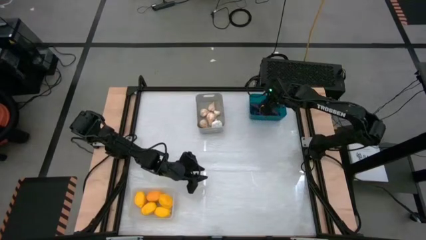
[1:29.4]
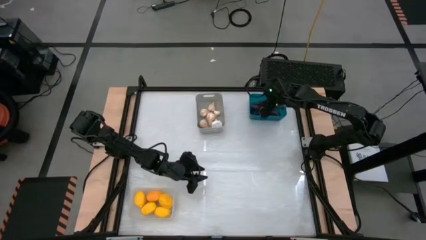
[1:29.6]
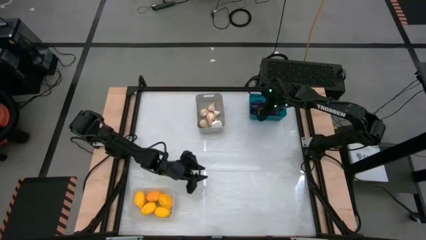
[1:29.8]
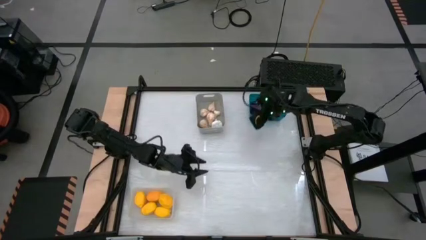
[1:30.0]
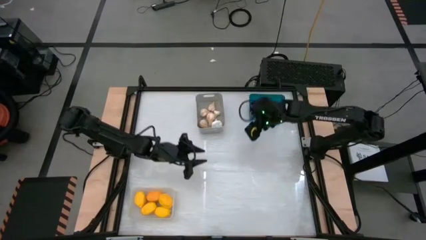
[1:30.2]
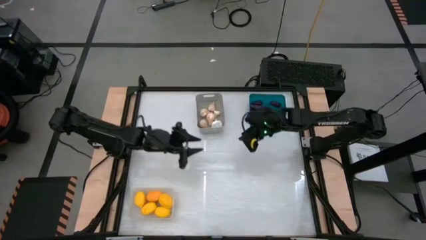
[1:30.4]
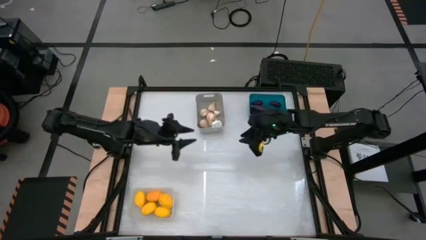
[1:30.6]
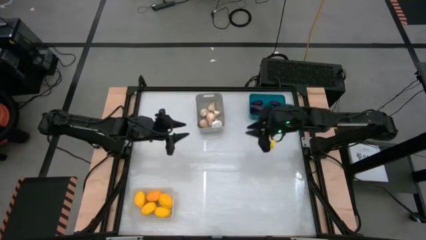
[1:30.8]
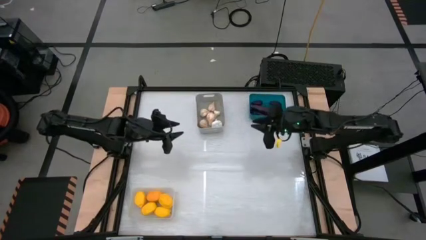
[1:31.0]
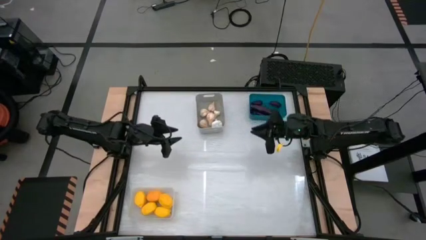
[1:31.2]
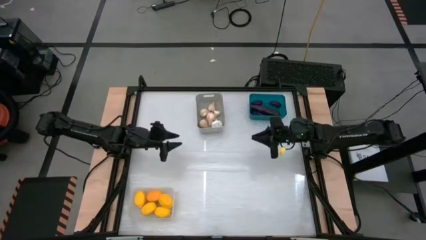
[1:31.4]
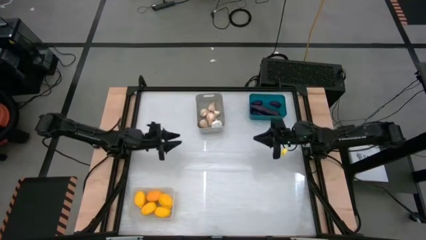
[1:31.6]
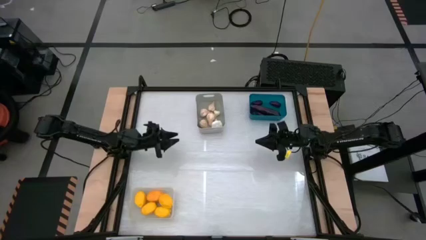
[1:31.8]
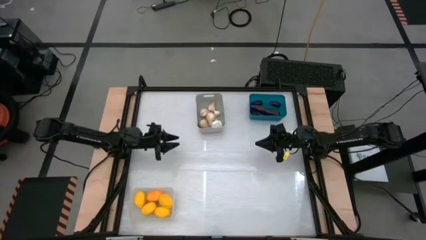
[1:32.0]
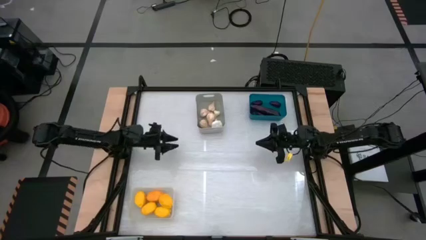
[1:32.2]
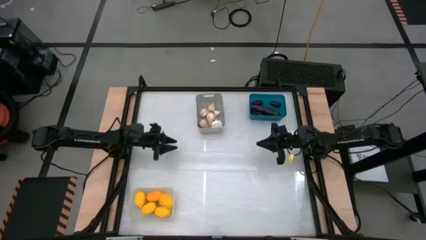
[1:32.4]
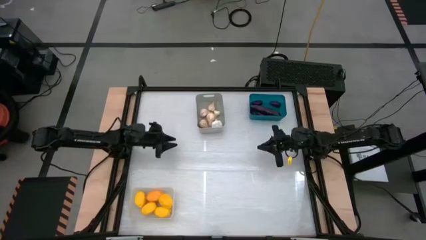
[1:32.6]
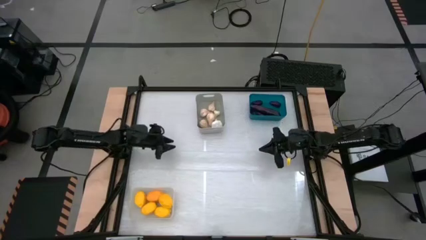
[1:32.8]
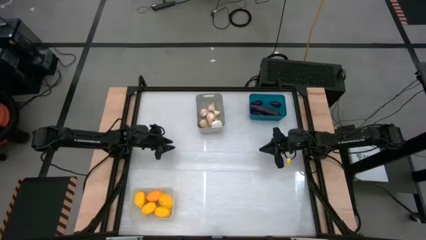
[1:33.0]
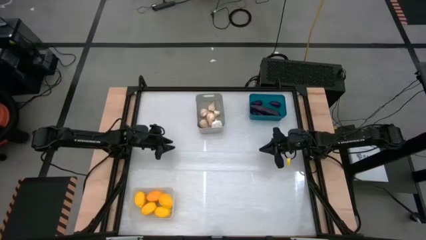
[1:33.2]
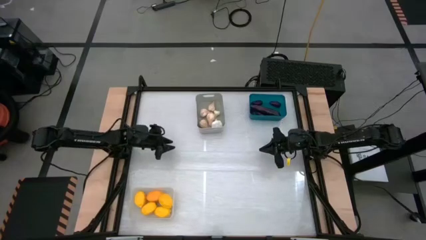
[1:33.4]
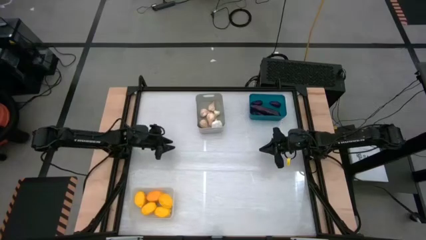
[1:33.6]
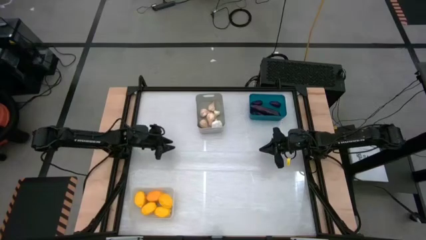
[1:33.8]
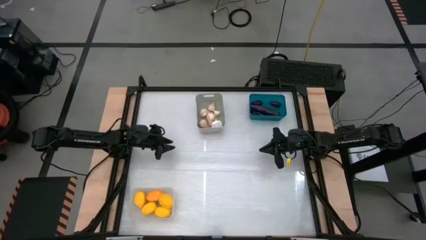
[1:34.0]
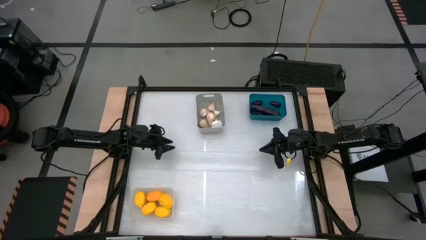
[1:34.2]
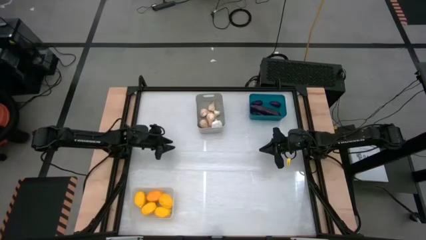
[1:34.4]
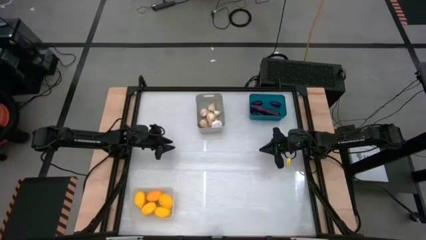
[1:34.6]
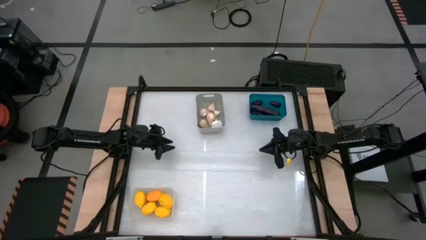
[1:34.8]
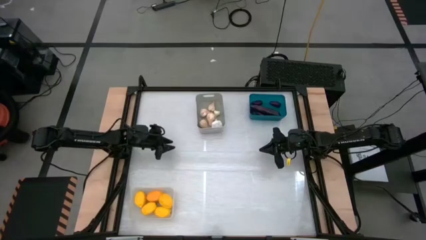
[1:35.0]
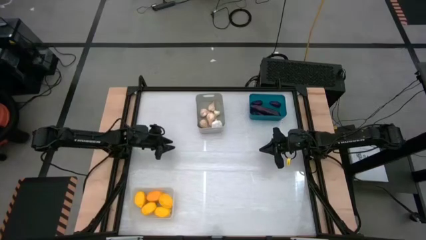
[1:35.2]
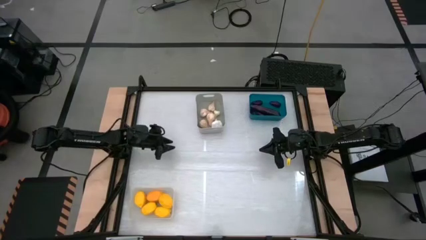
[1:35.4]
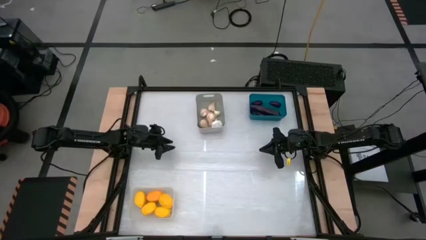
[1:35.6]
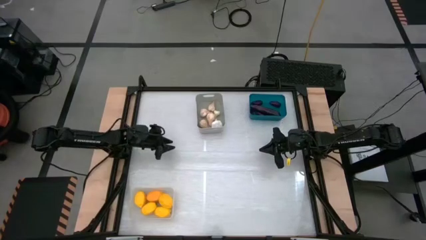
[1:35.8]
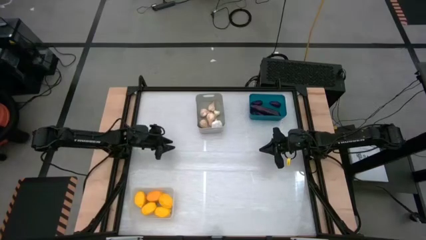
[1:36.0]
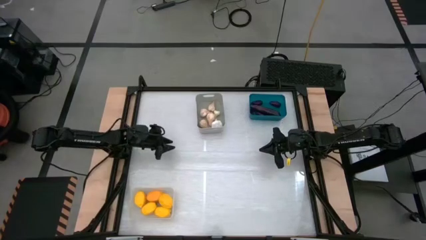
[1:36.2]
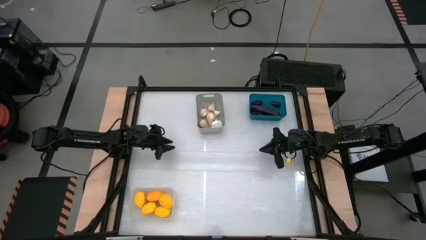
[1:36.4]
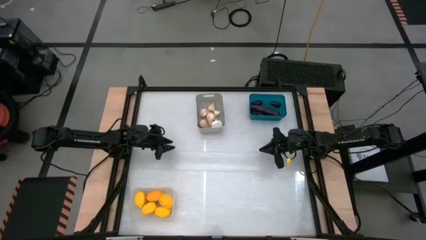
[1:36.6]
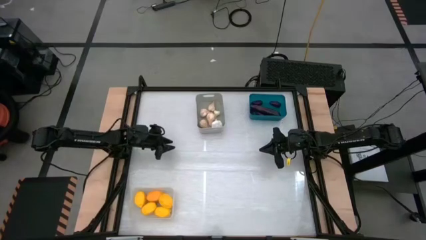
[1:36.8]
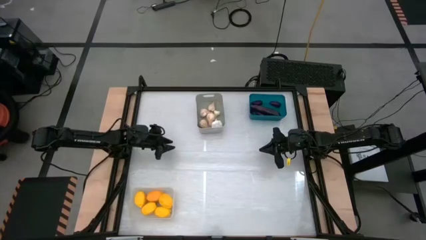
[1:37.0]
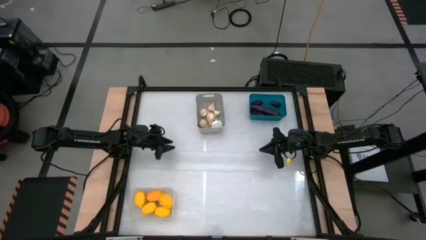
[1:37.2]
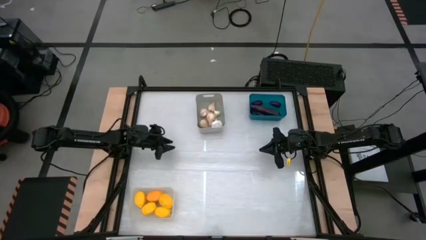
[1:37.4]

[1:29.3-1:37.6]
Task: Sort produce into baskets
Return to Home Position

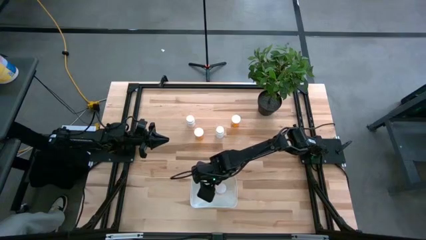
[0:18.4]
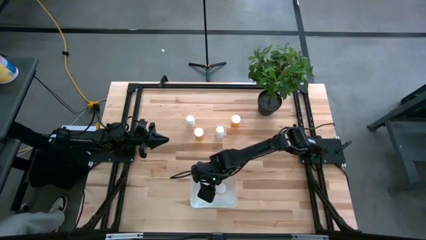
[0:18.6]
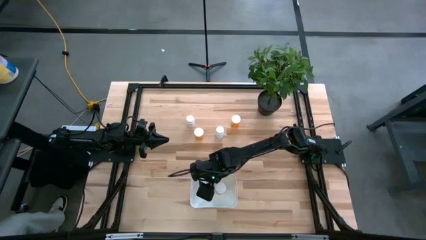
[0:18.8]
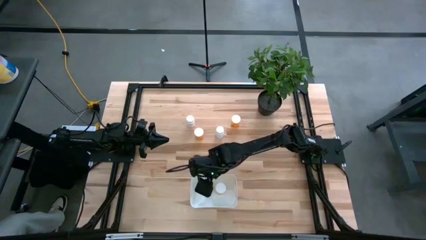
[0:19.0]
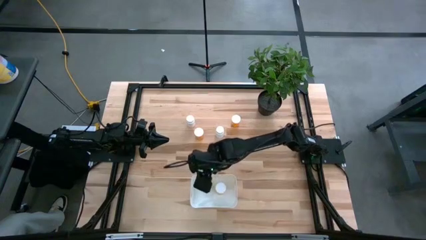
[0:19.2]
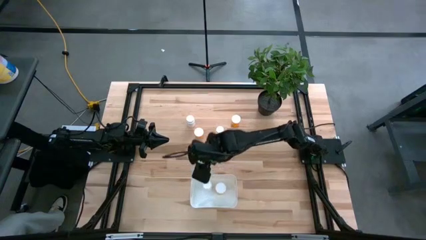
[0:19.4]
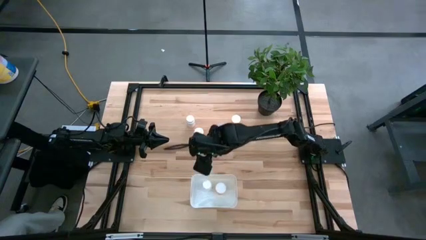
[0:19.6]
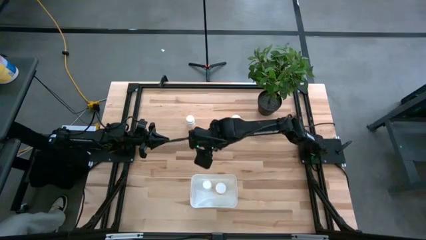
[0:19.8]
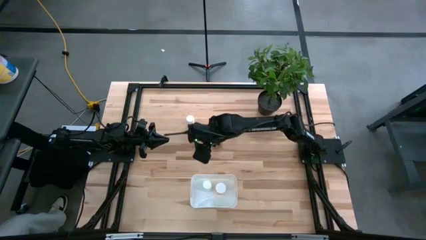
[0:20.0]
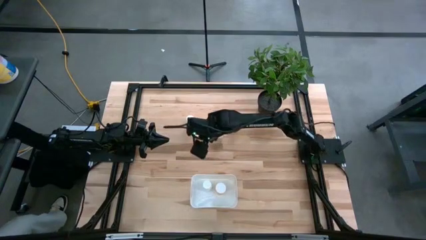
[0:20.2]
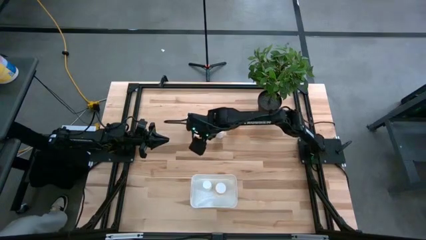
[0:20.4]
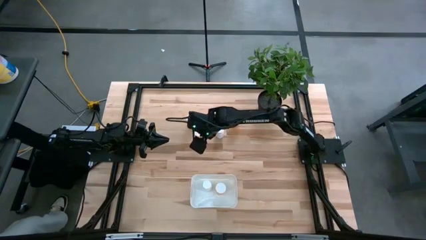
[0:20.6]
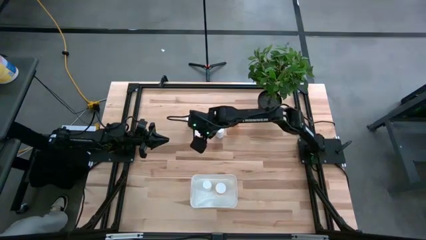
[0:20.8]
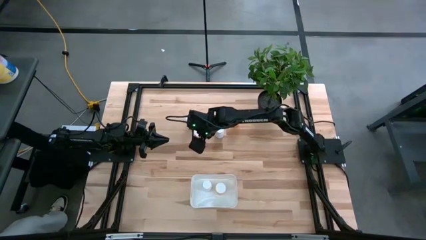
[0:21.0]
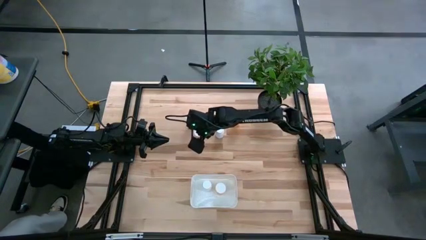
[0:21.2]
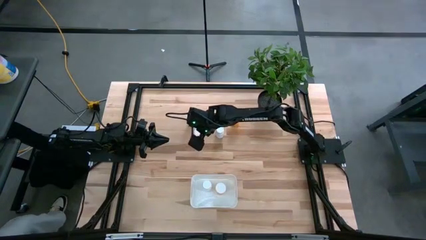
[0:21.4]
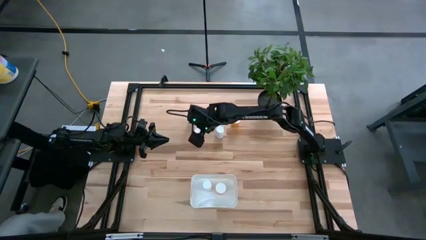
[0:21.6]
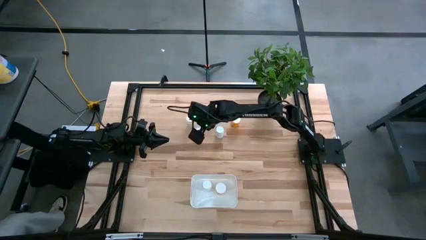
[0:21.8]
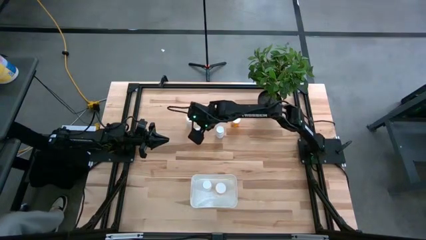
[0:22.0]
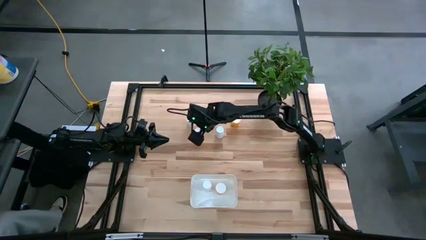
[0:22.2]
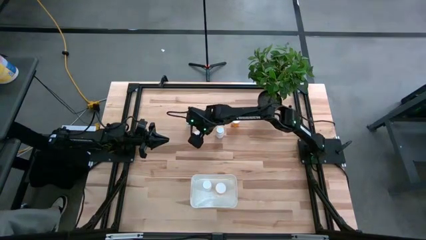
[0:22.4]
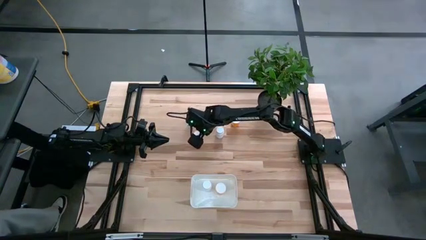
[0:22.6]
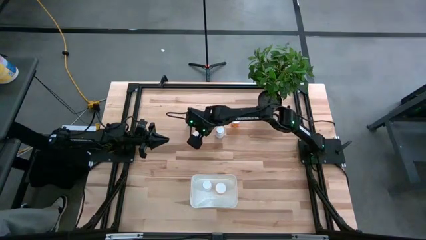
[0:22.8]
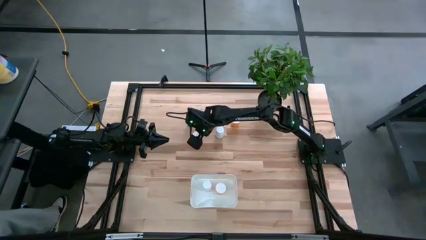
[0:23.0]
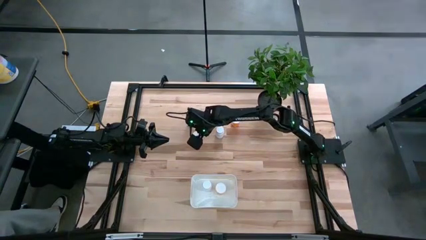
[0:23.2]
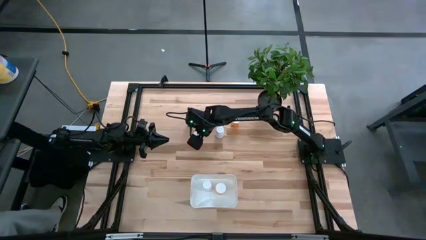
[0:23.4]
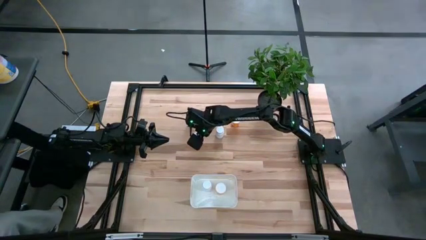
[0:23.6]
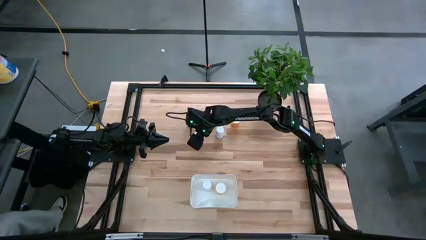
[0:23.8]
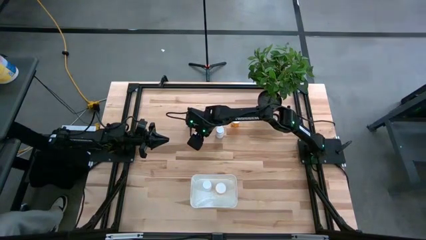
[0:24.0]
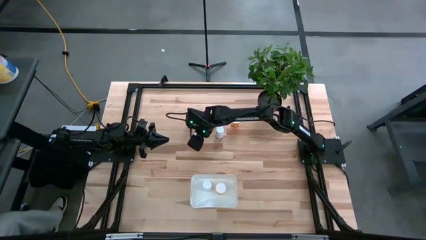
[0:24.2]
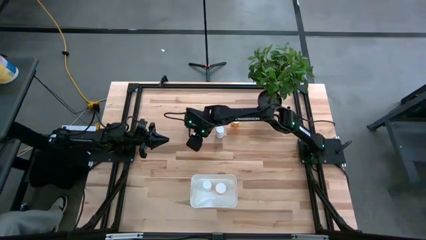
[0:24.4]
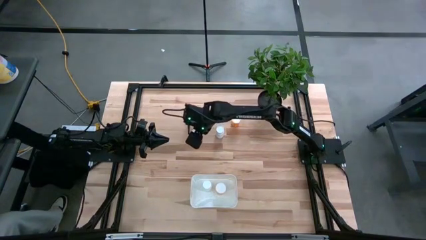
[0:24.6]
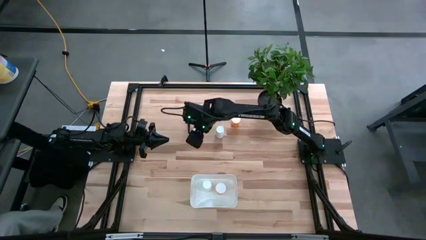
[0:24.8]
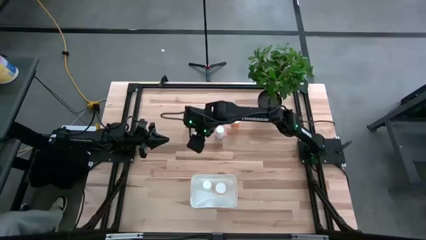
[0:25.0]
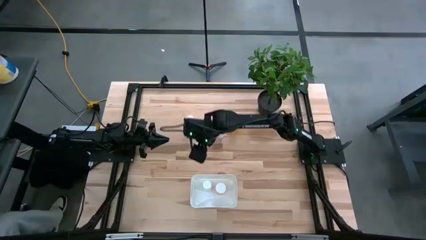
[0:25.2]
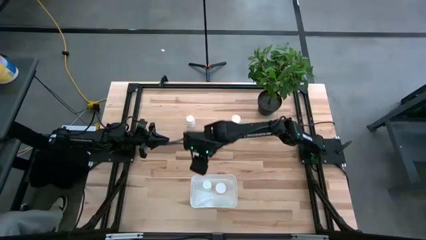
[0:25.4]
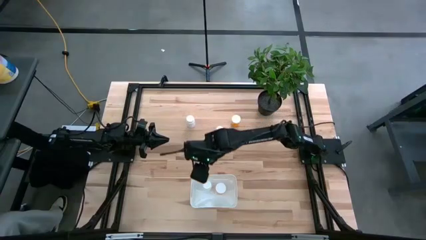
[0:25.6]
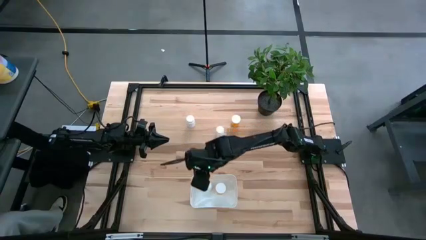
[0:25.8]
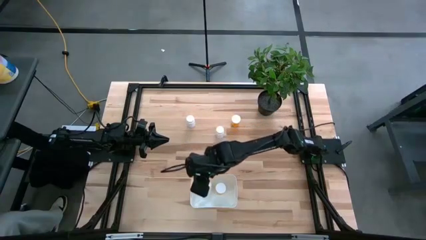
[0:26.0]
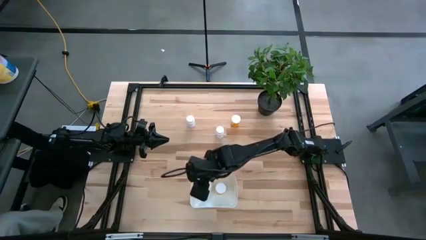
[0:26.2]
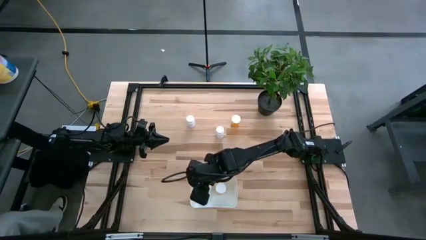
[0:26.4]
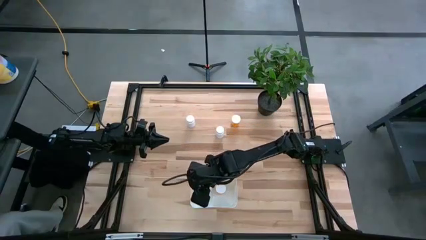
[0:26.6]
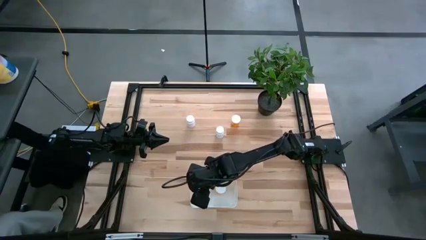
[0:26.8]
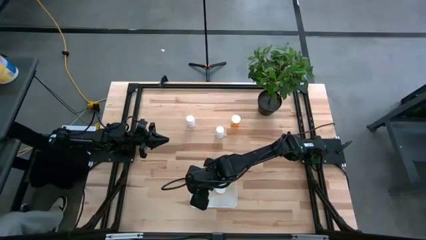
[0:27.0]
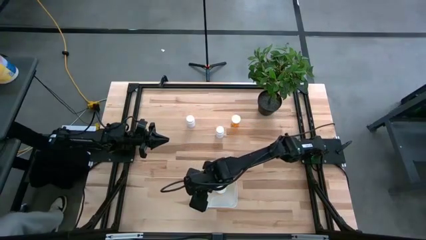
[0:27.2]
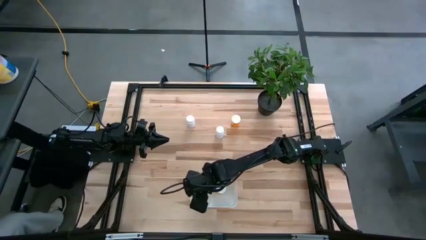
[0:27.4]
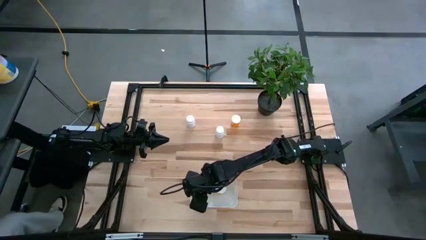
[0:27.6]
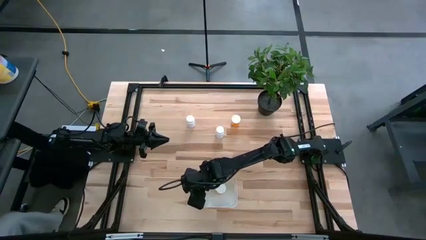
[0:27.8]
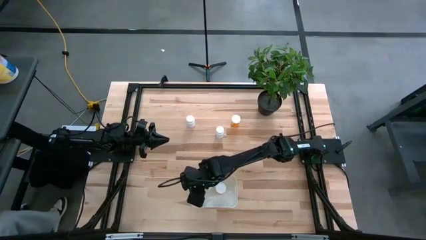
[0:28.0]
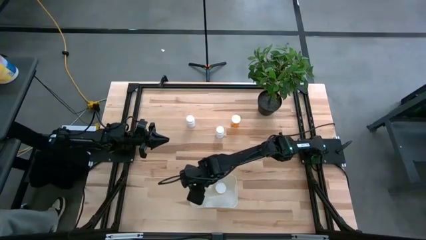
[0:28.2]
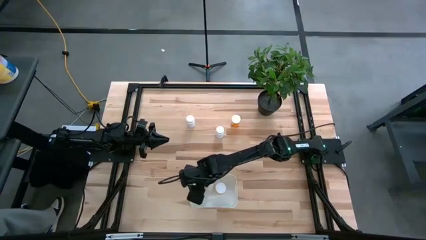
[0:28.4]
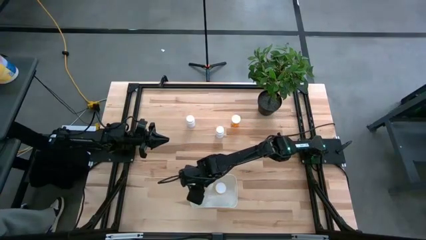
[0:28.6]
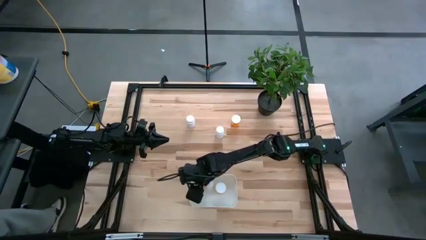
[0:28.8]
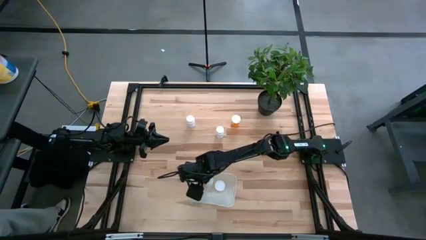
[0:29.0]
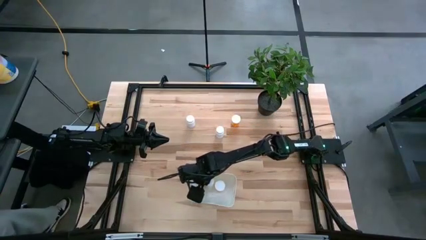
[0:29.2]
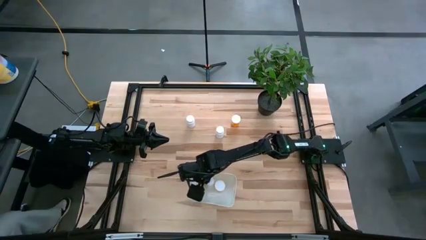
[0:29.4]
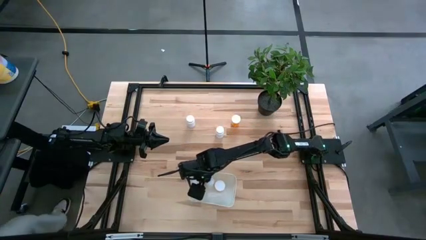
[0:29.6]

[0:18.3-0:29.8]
Task: Pick and place pill bottles into a basket
Put the left orange medicine bottle into the container
